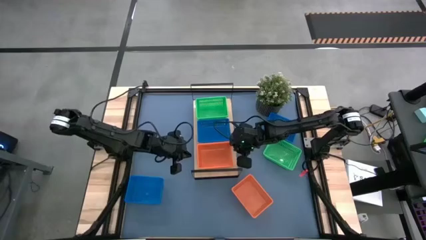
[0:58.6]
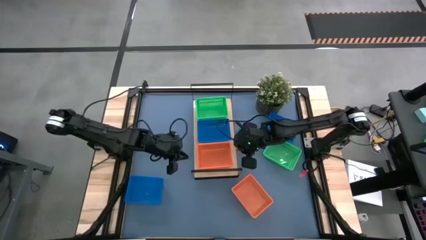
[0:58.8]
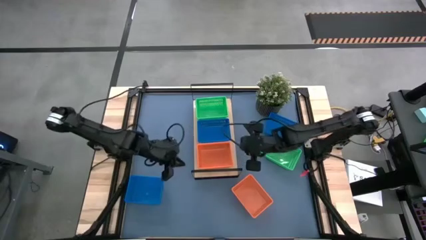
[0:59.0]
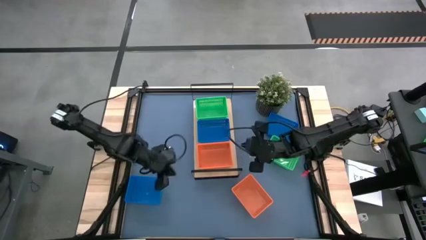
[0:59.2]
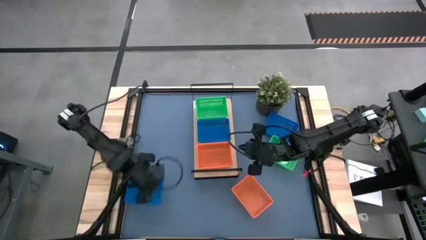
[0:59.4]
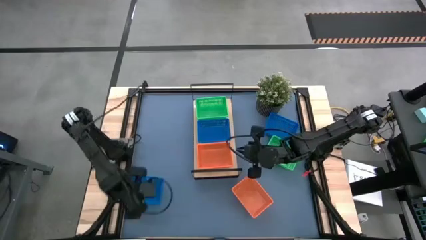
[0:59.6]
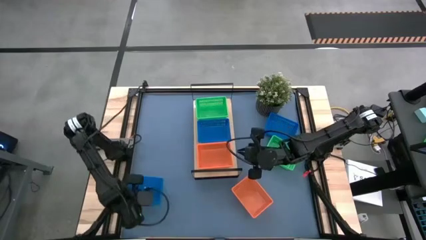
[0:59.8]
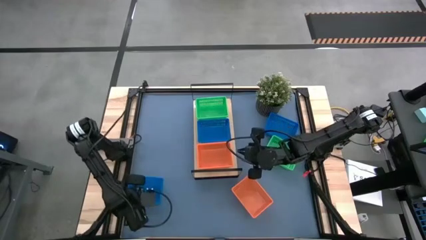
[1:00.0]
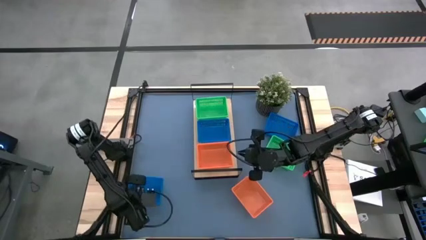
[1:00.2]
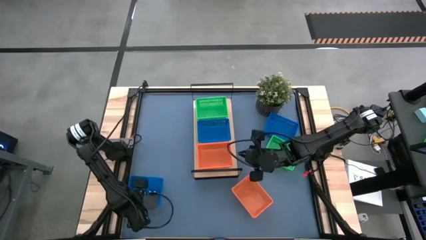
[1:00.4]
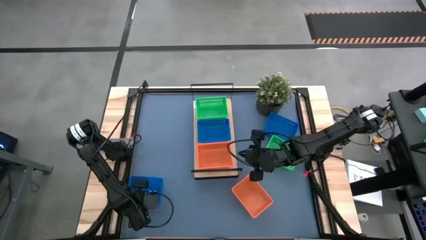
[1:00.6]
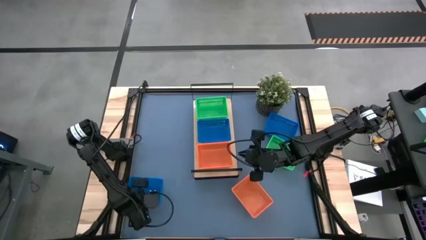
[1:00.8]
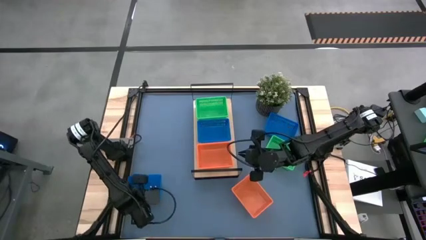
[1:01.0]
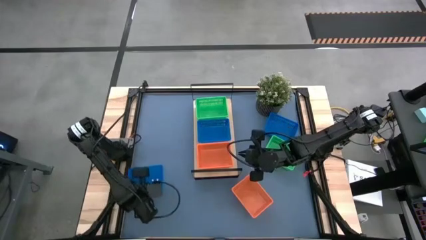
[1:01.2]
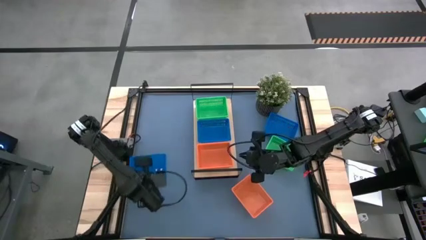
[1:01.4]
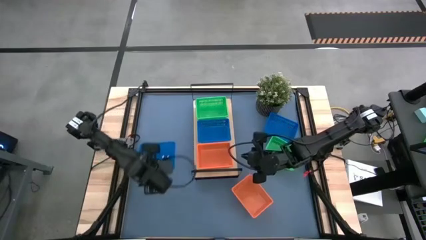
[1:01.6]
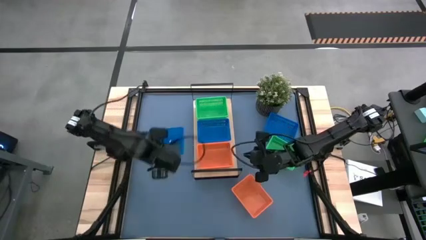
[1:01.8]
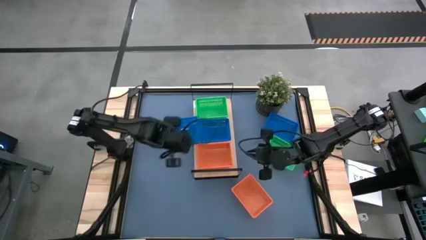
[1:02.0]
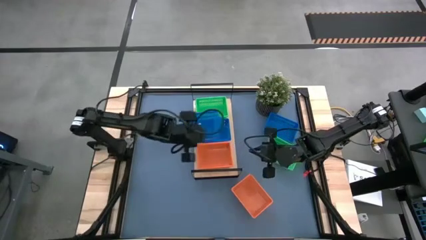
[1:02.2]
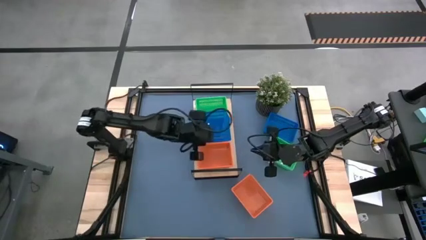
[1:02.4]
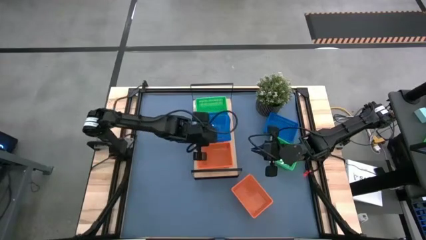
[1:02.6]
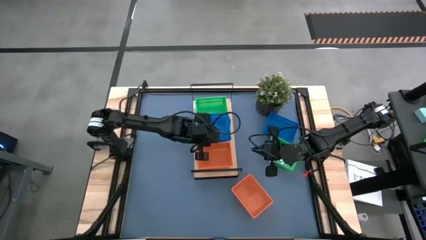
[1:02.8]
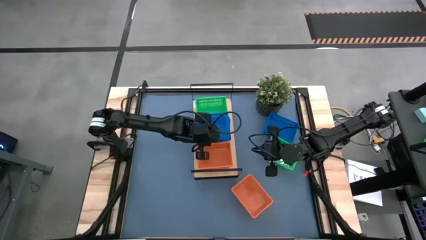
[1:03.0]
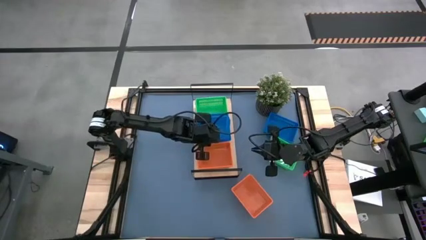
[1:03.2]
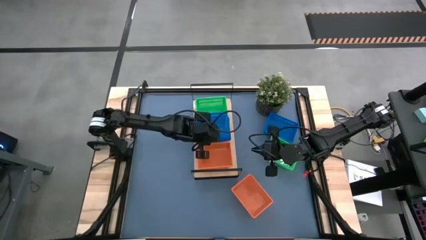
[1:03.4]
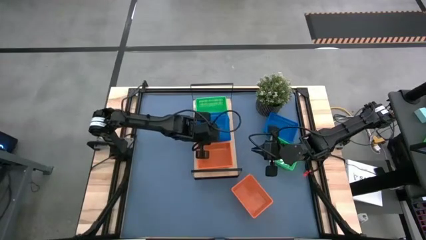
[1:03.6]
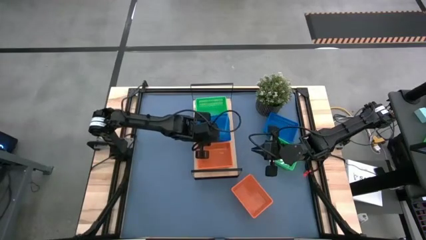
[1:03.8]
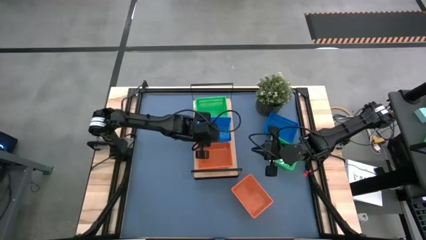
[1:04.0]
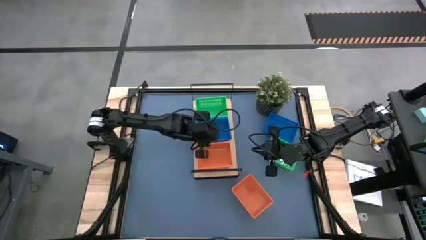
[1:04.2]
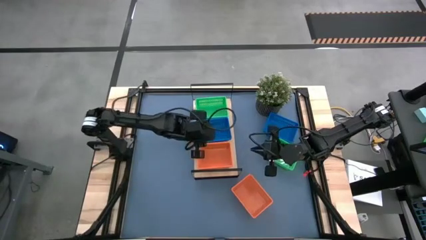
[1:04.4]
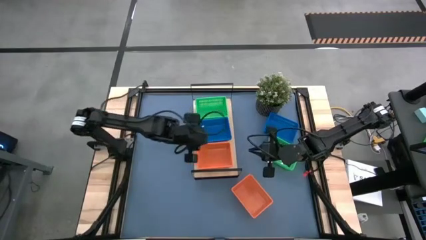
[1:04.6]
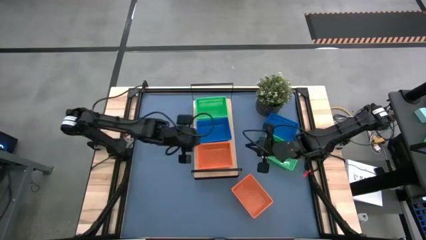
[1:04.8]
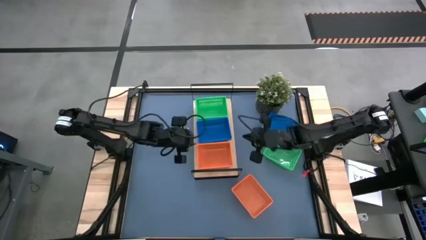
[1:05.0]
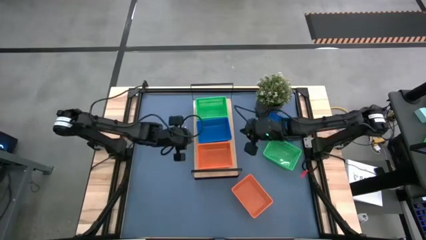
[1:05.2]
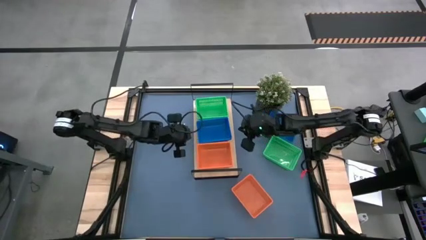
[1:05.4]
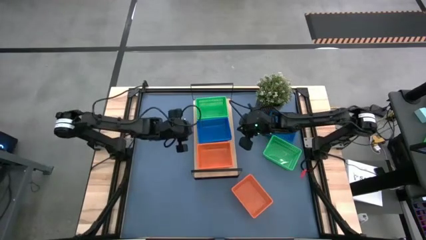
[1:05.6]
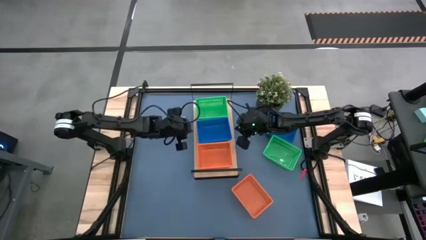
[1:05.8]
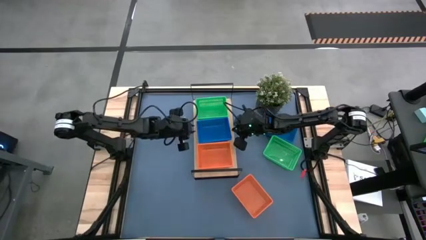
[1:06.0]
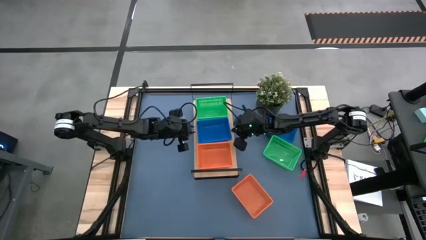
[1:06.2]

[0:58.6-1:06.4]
Task: Stack baskets on shelf by color
Stack the bottom blue bin on top of the blue bin on the shelf

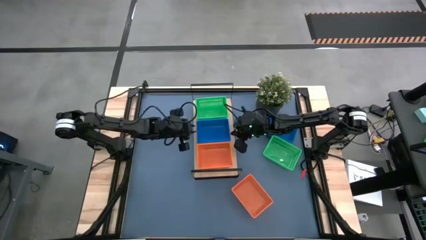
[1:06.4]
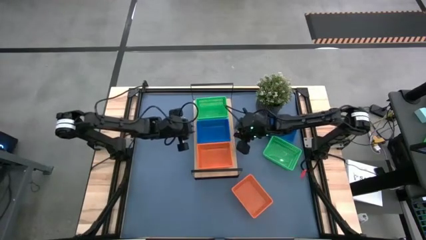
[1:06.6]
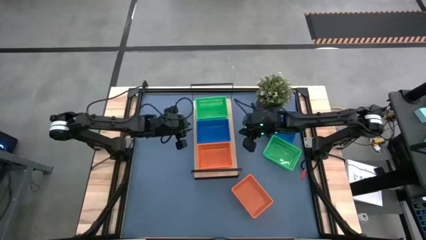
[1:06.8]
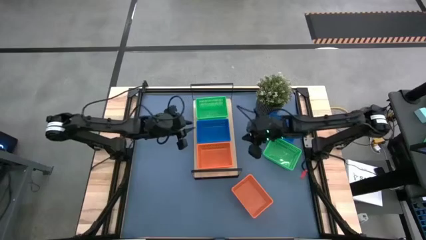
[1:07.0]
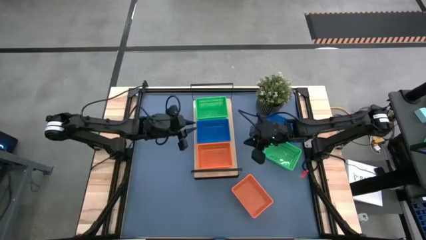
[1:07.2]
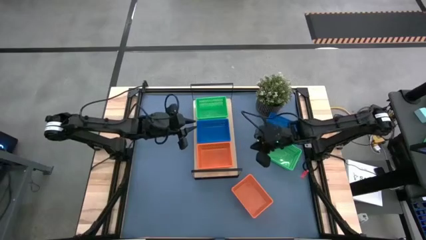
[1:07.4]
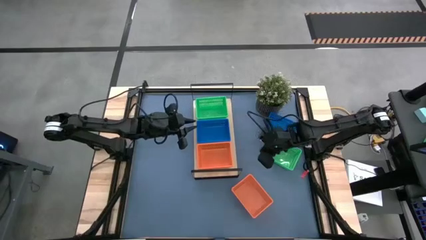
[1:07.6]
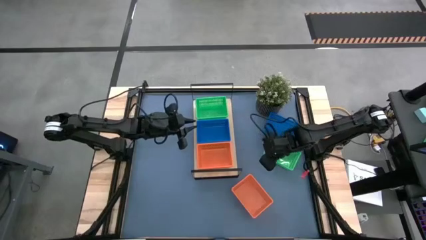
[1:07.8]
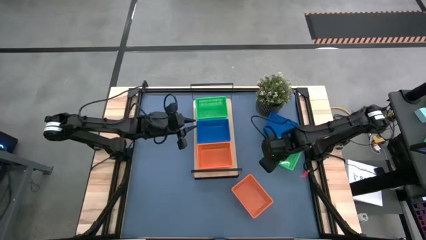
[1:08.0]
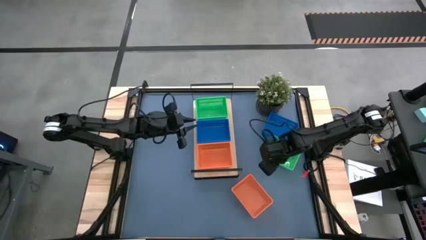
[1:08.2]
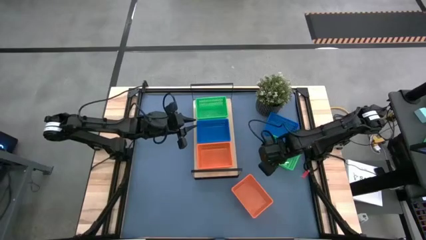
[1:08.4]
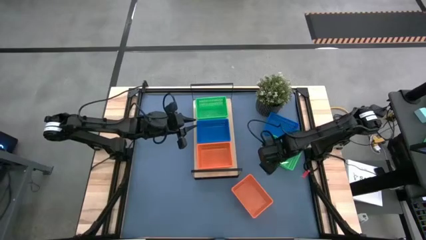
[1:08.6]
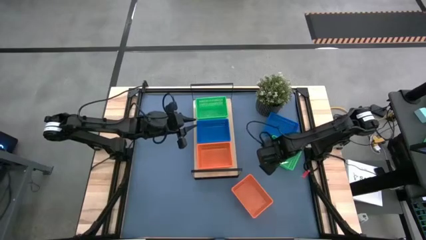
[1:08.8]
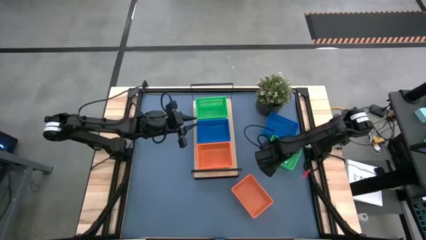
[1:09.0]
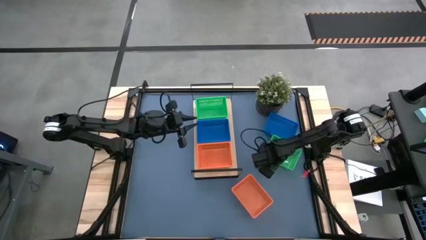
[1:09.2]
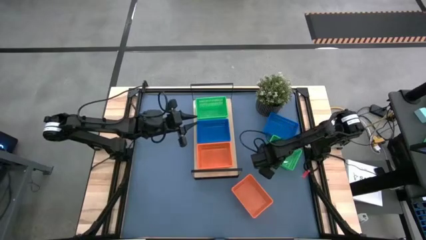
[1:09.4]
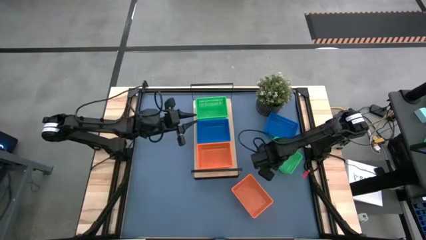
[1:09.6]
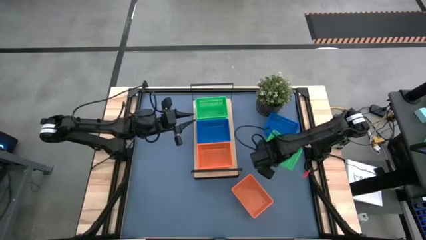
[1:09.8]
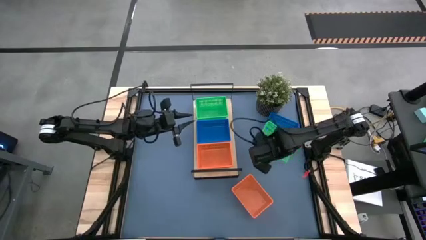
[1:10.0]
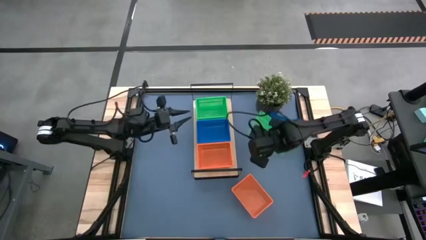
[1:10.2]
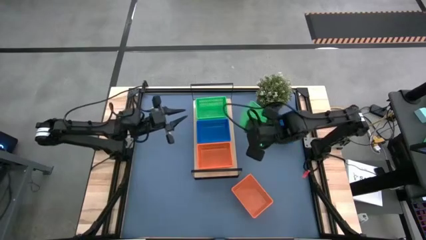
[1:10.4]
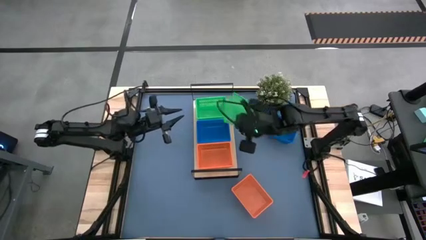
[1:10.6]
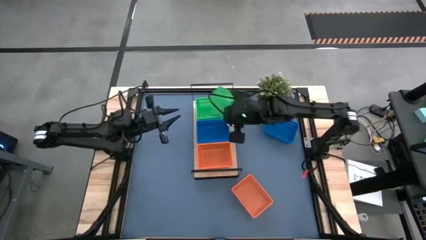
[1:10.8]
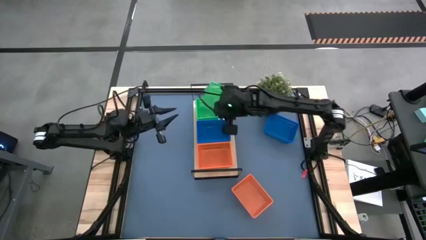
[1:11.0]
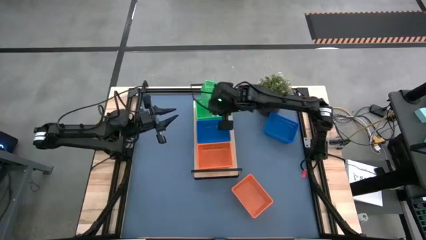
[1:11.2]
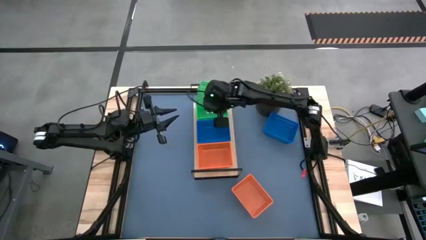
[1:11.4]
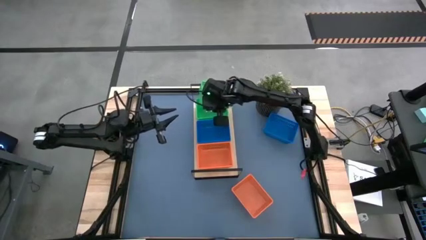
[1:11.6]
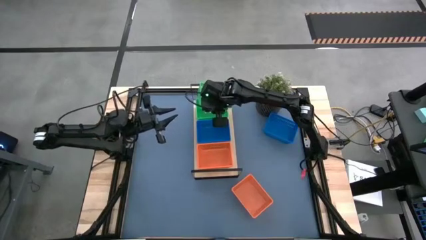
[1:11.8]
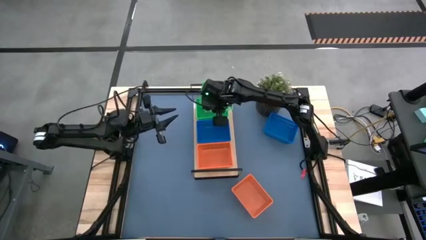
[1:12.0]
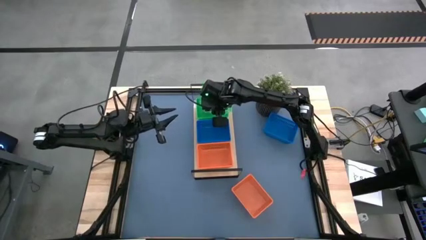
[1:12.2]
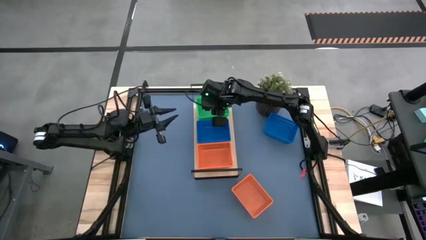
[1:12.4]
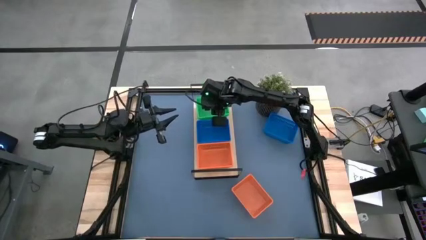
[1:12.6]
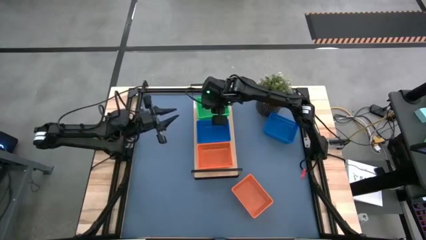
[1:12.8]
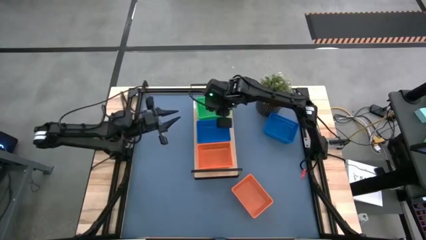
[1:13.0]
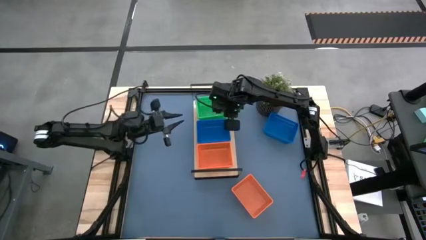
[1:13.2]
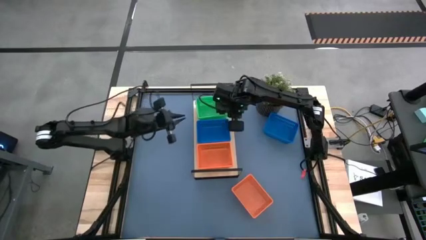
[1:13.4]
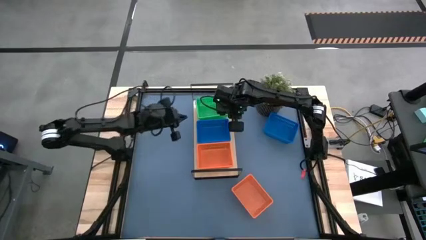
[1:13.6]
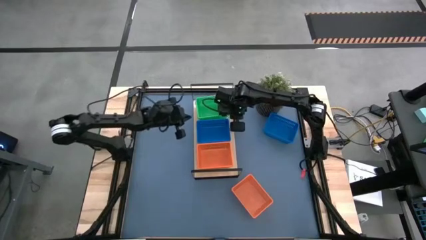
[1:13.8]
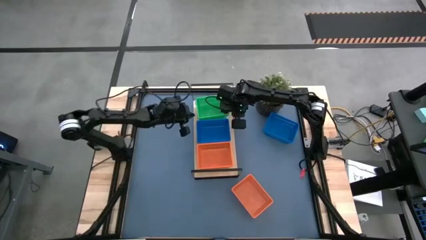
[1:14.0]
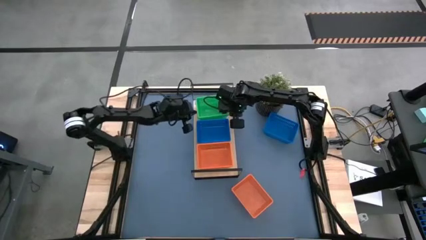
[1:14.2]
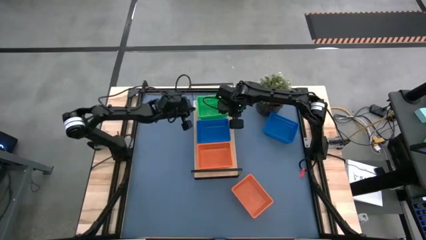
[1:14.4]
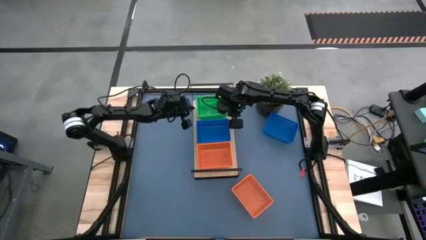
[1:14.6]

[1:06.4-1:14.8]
Stack the green bin on top of the green bin on the shelf
